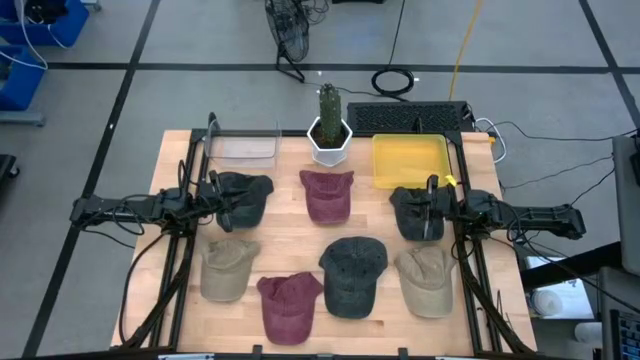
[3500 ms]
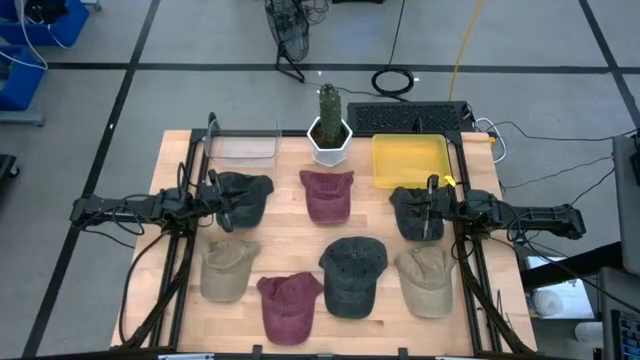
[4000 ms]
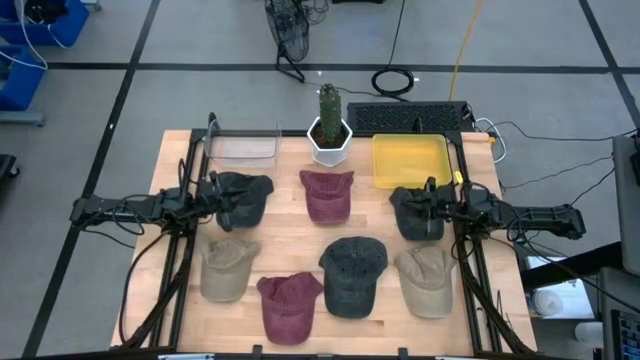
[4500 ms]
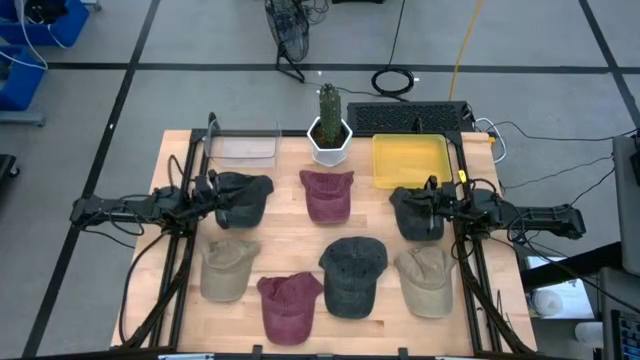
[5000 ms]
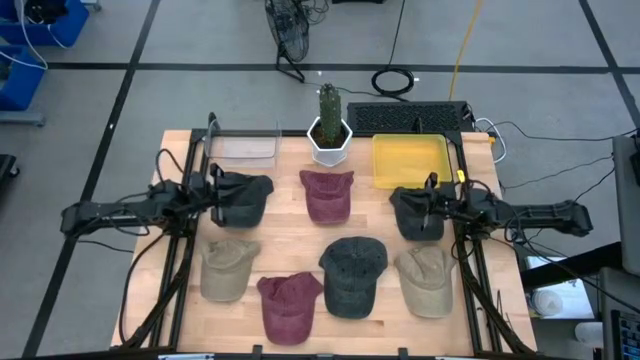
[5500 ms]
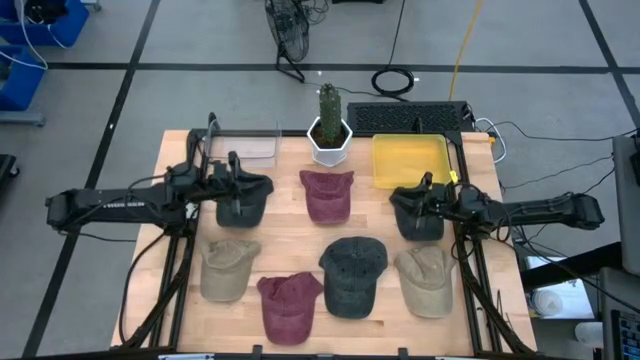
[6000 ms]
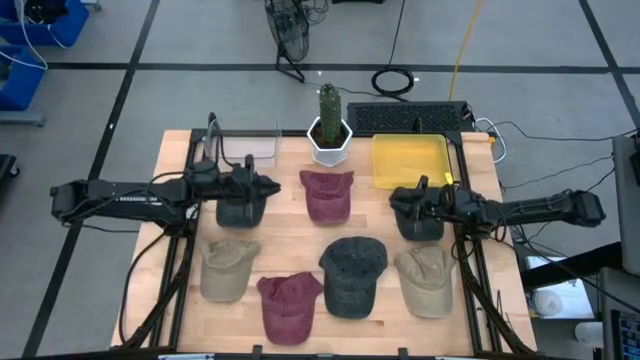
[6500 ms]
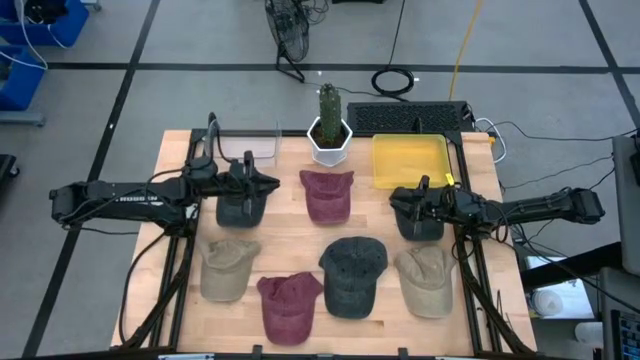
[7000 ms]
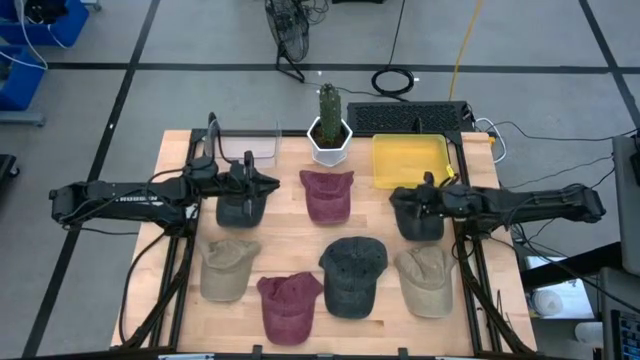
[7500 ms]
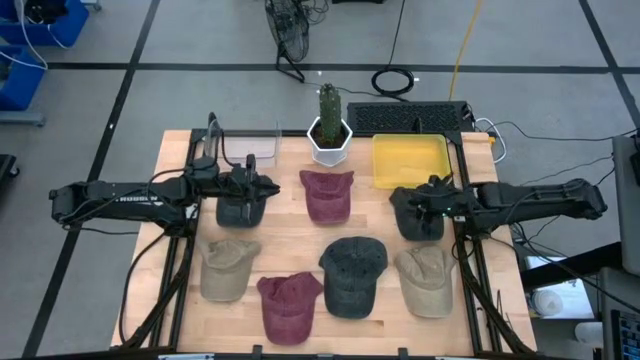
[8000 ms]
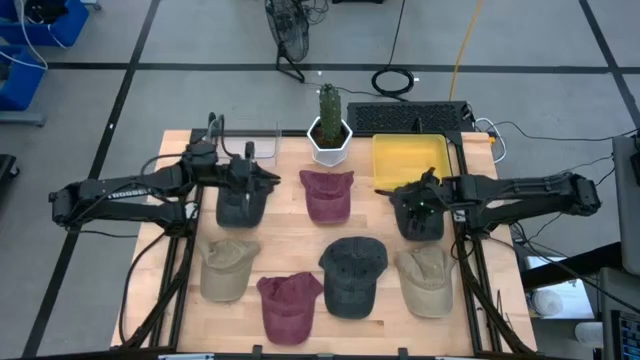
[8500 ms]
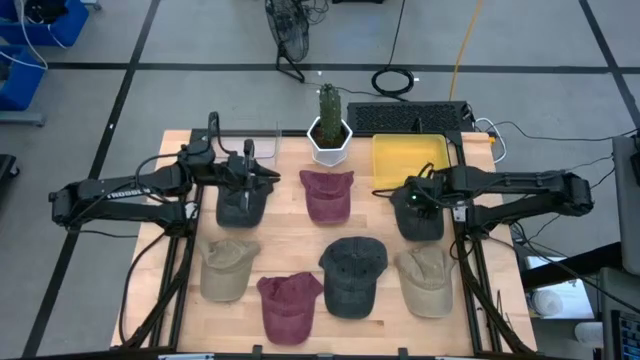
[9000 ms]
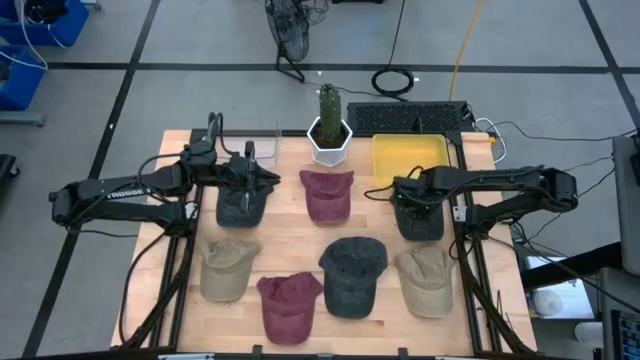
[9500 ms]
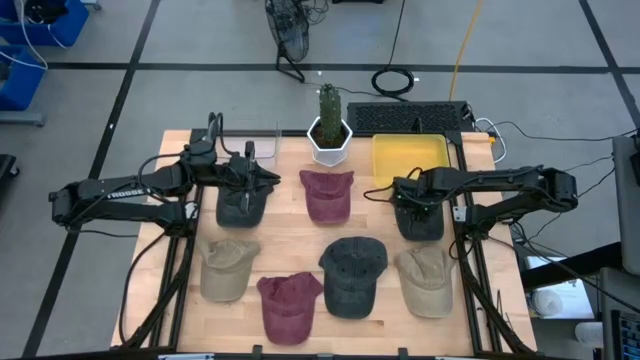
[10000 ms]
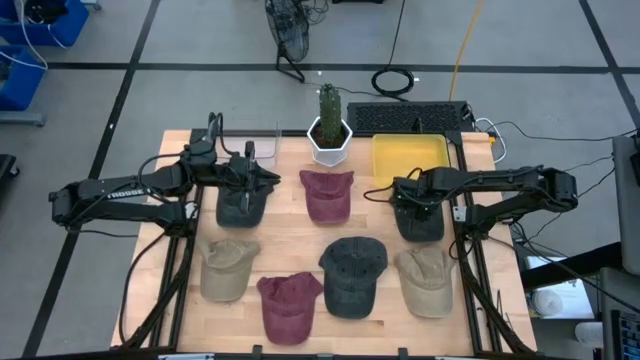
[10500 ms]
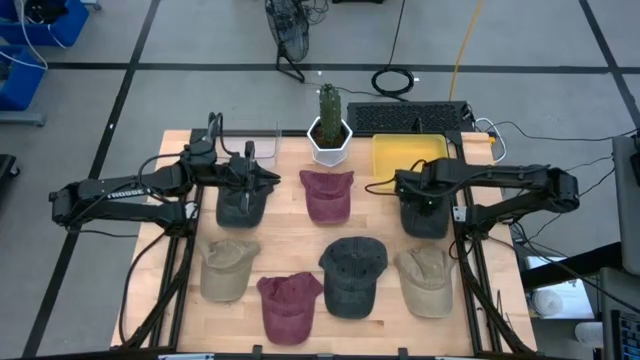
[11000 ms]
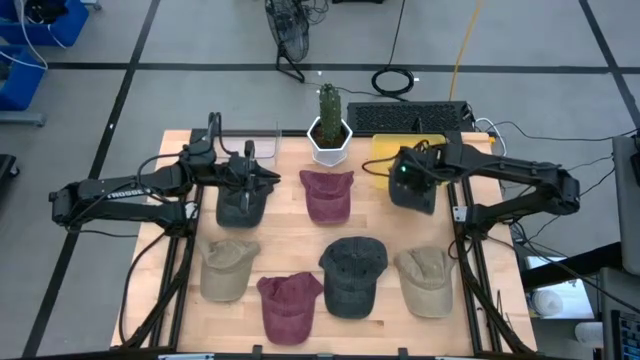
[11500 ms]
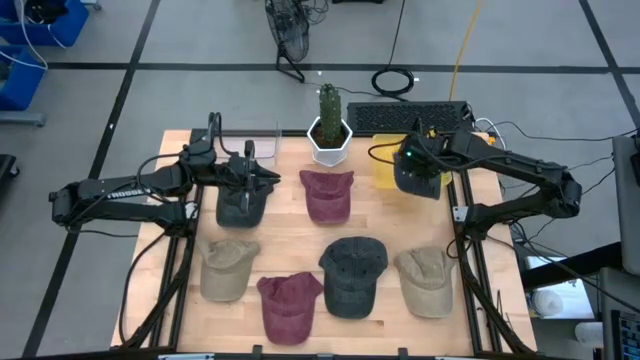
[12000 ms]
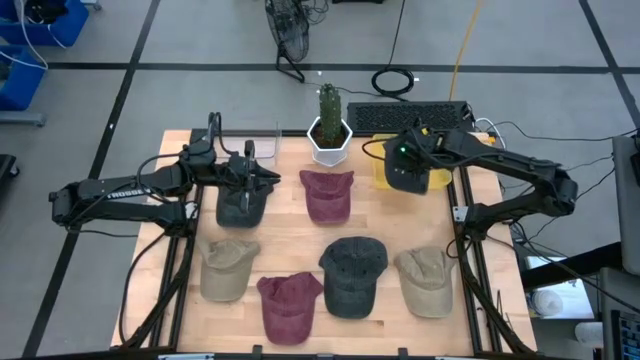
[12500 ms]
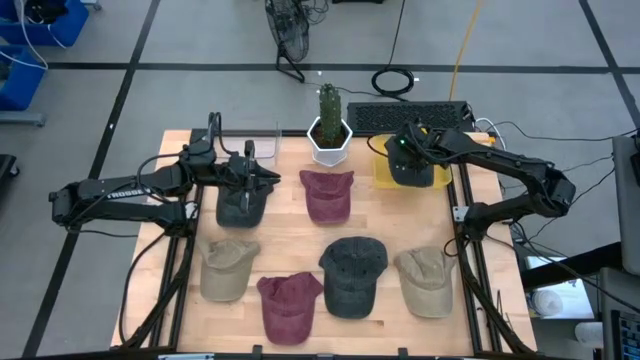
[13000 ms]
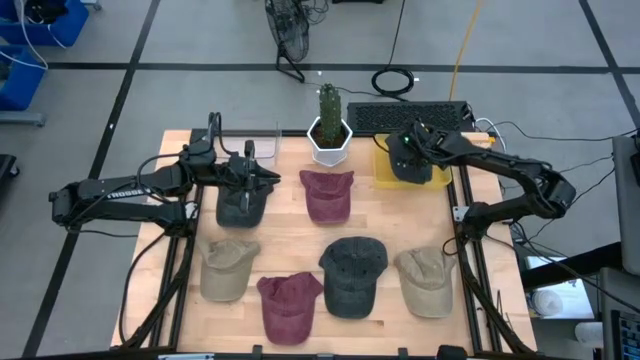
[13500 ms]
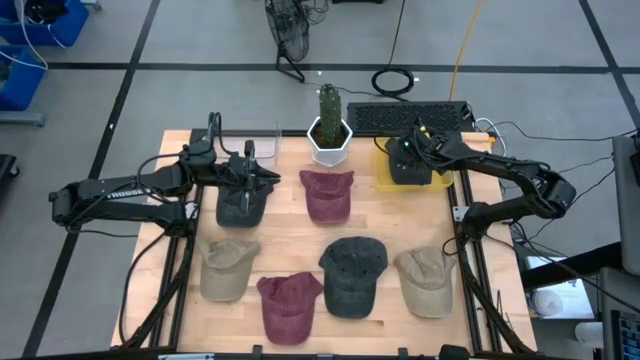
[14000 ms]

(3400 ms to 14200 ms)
Task: Pick & Place hat
Put the top right black cap into the yellow bin

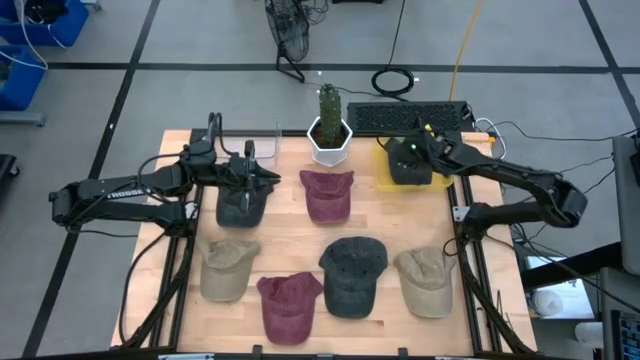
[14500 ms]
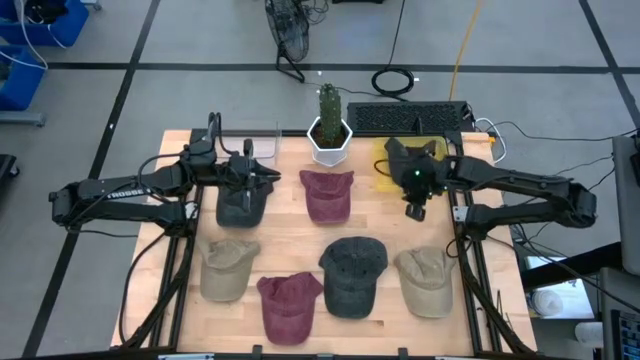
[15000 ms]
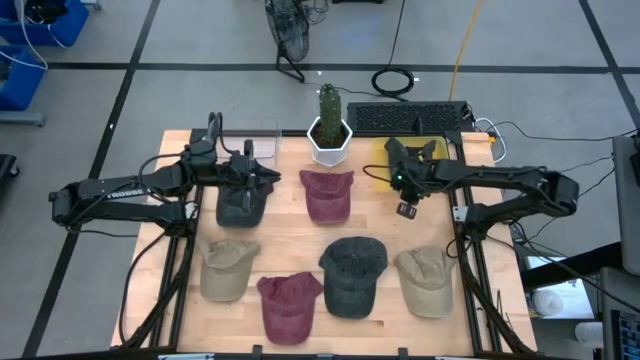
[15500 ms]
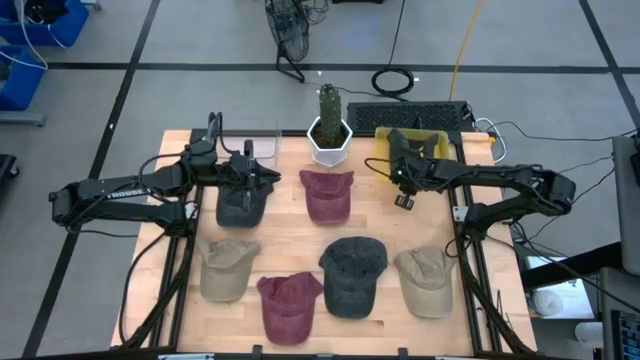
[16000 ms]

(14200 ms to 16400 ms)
Adjust the yellow bin

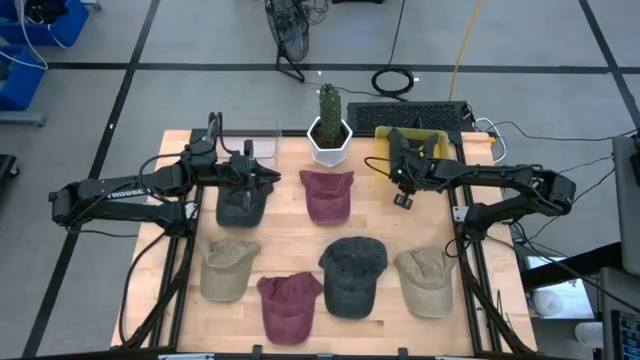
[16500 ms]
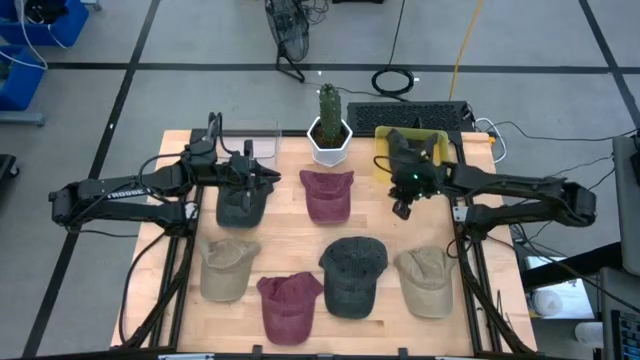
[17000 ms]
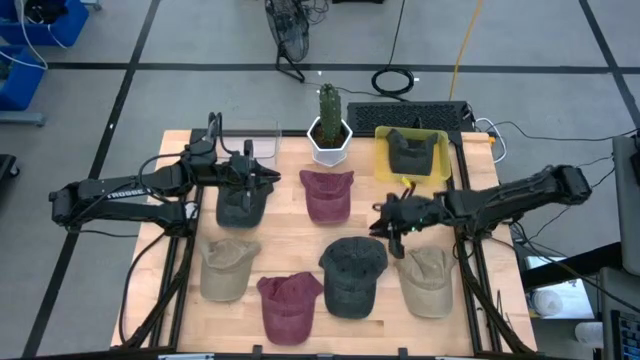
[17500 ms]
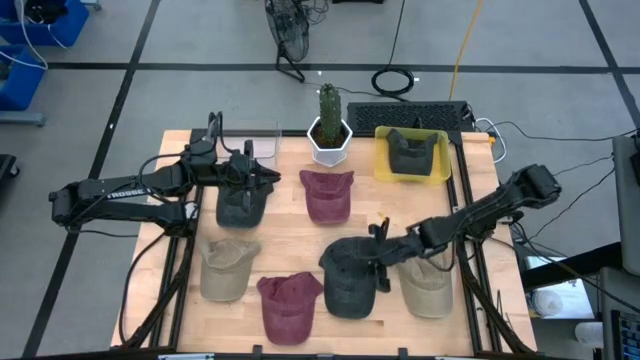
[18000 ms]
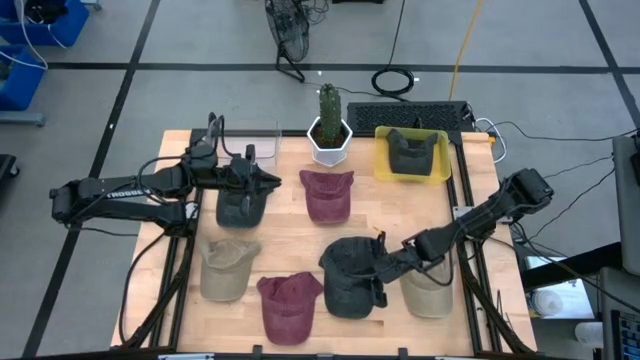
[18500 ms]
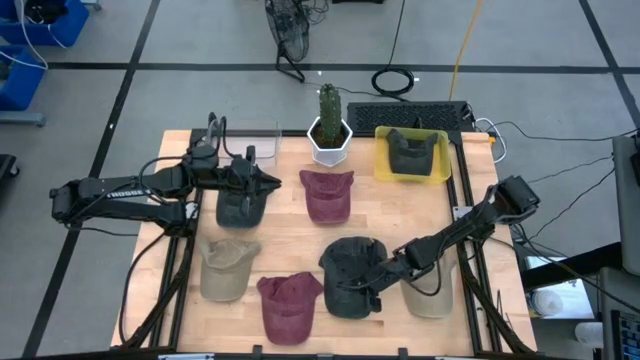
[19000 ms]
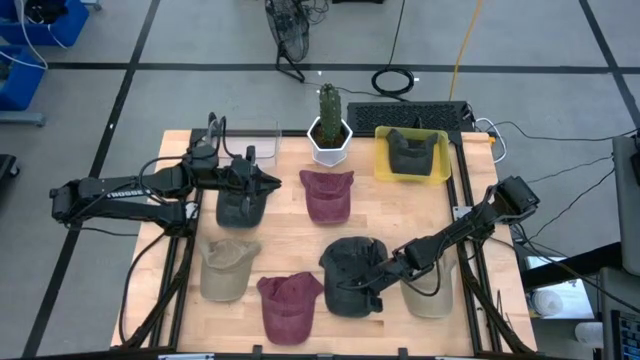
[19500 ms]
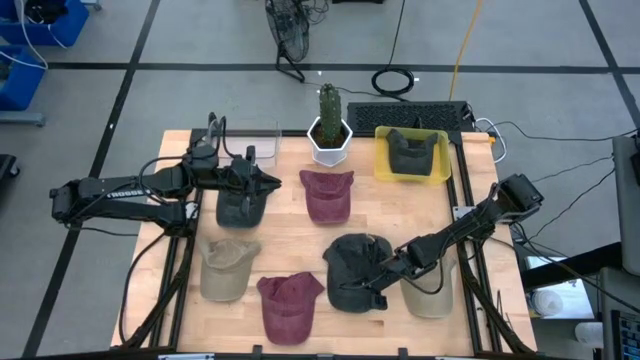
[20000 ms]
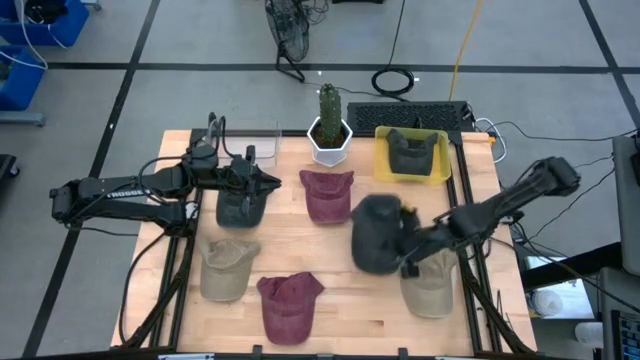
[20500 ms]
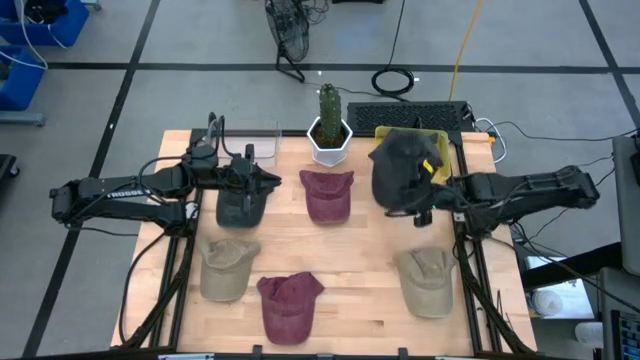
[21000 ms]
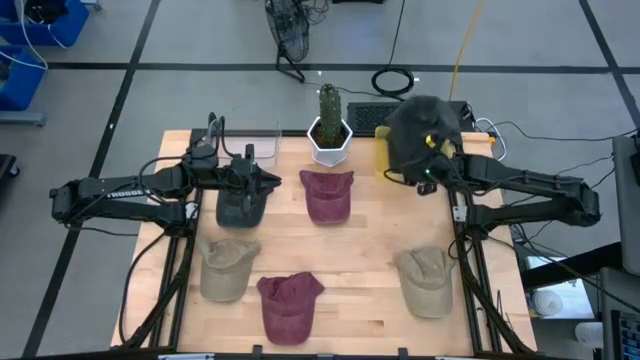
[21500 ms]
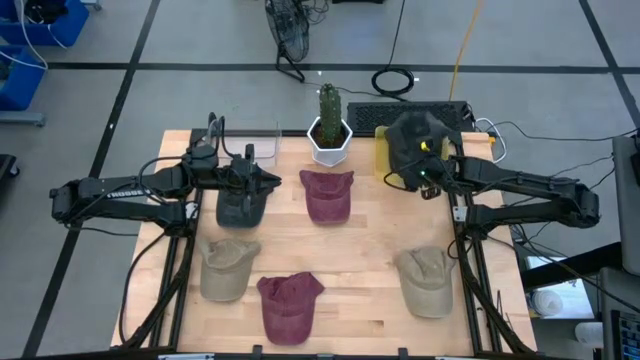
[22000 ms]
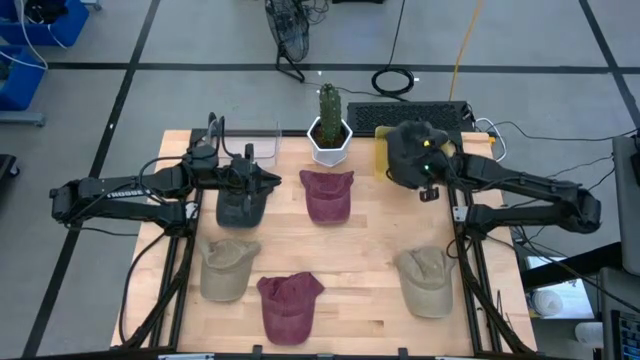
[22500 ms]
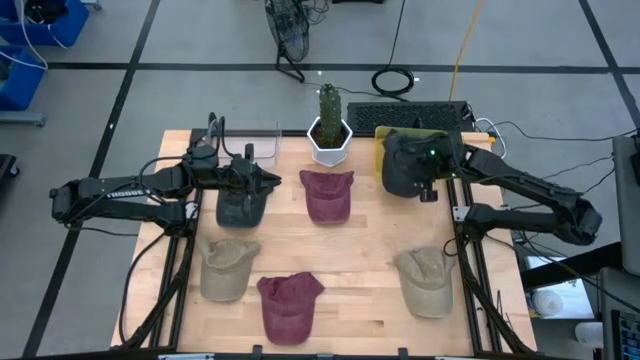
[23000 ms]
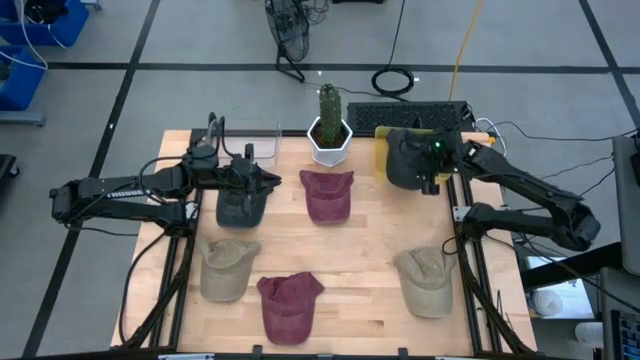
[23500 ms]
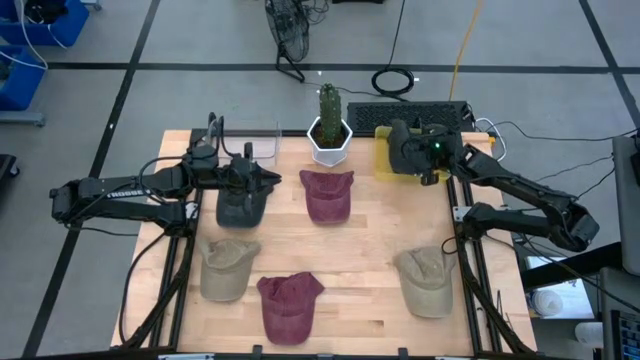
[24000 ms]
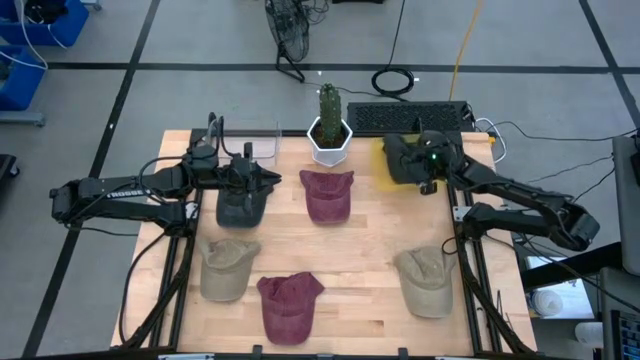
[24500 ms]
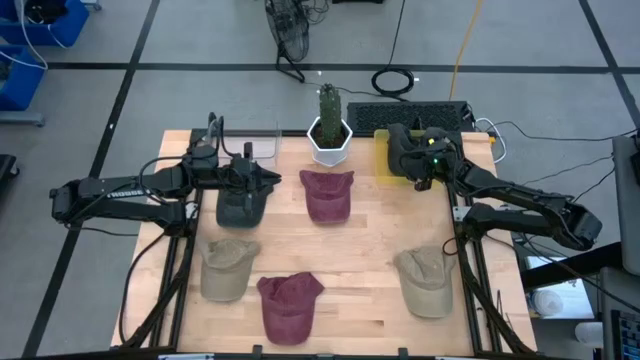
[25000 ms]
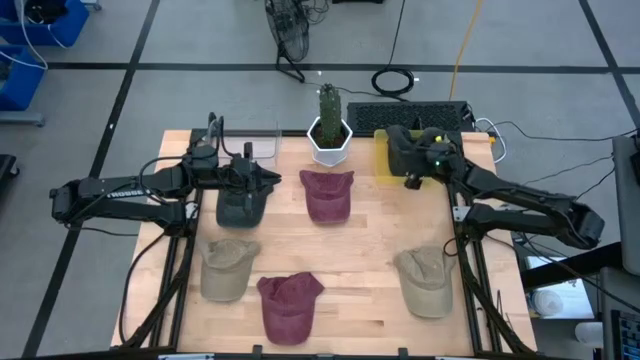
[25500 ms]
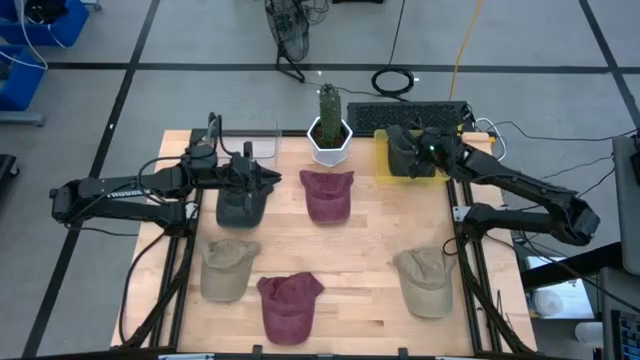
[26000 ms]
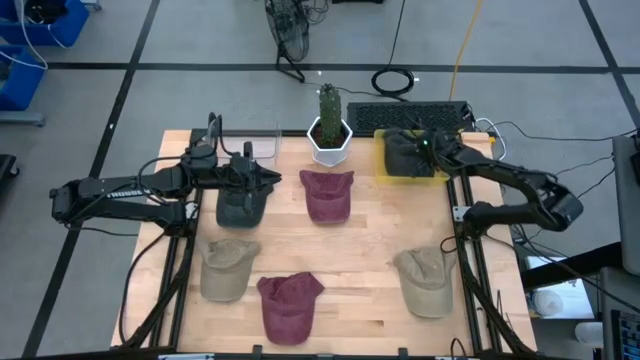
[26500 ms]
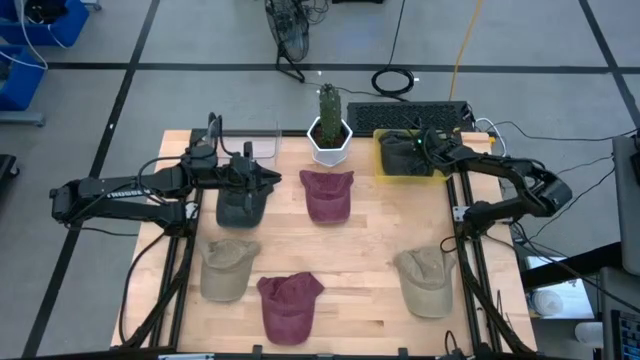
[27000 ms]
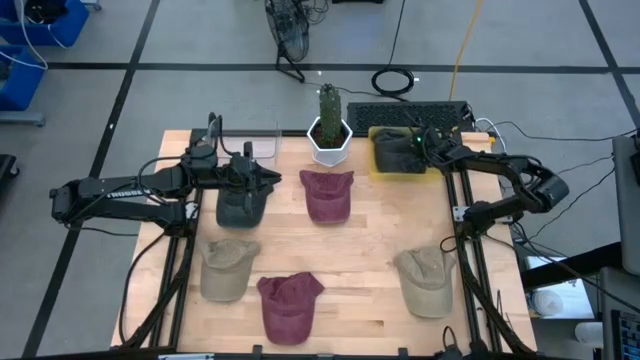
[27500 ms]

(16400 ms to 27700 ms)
Put the bottom black cap into the yellow bin
